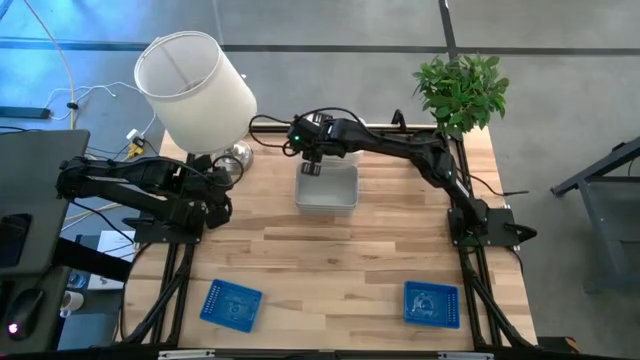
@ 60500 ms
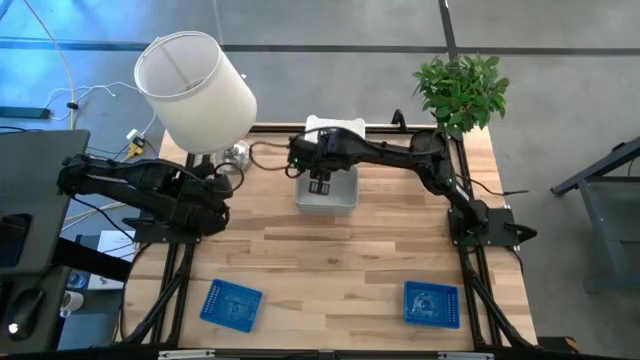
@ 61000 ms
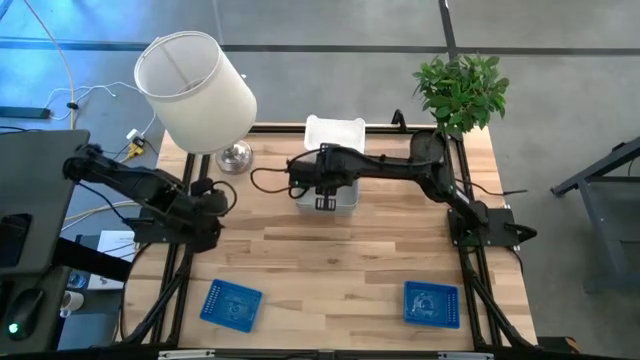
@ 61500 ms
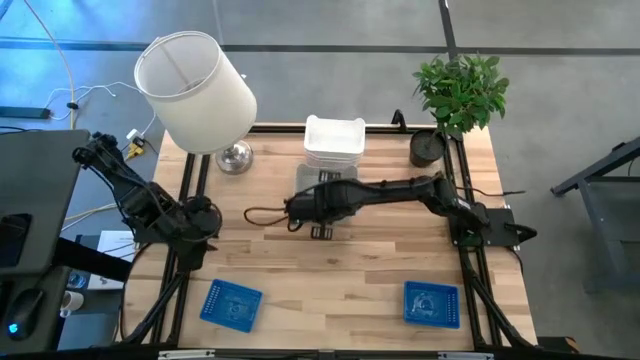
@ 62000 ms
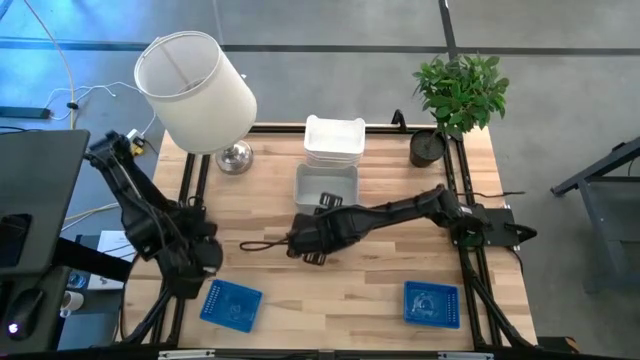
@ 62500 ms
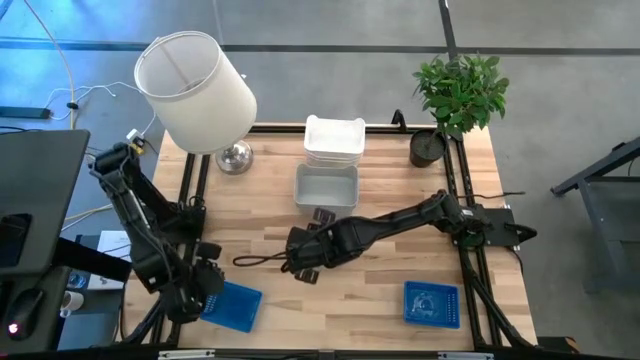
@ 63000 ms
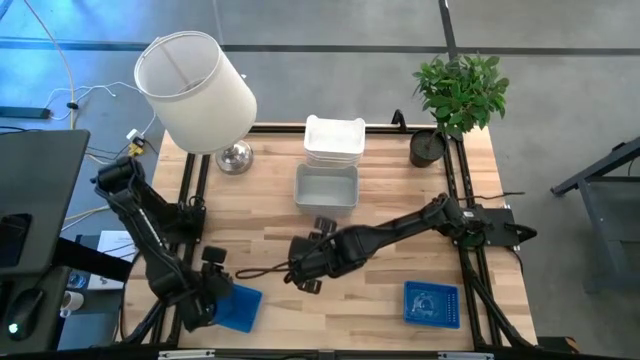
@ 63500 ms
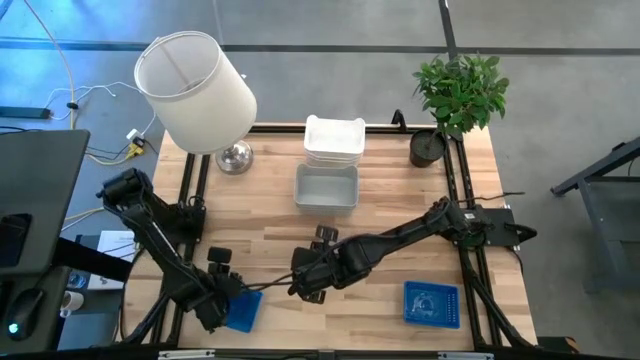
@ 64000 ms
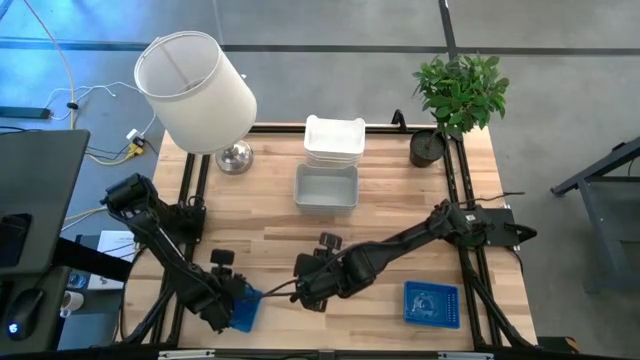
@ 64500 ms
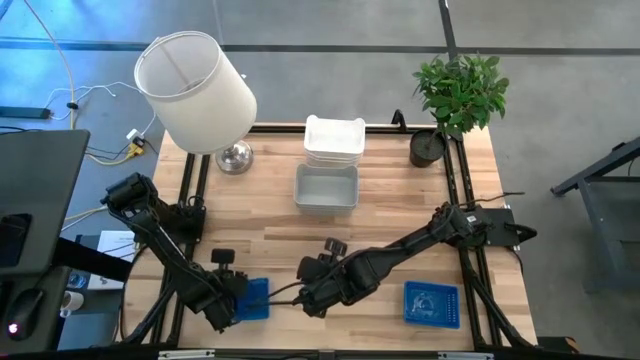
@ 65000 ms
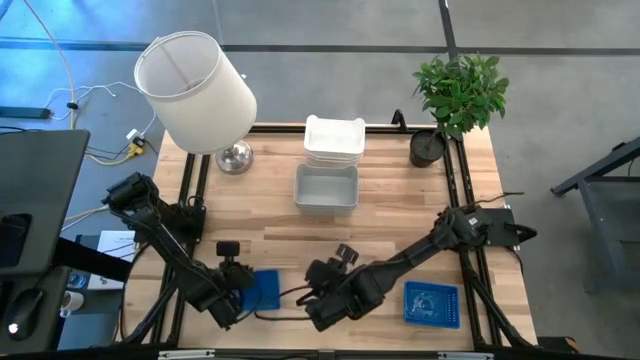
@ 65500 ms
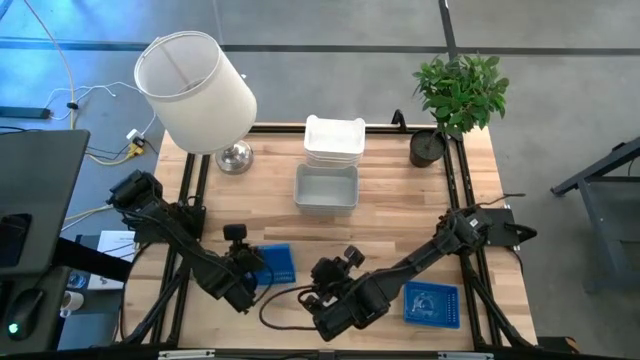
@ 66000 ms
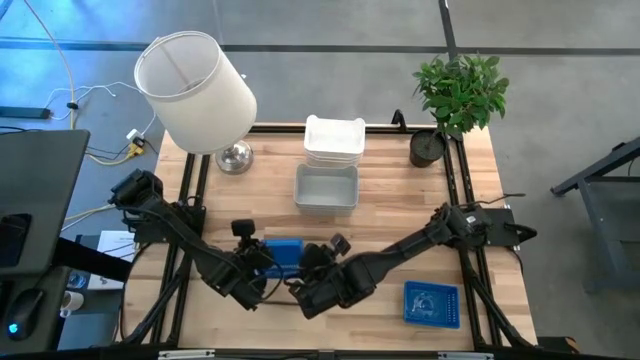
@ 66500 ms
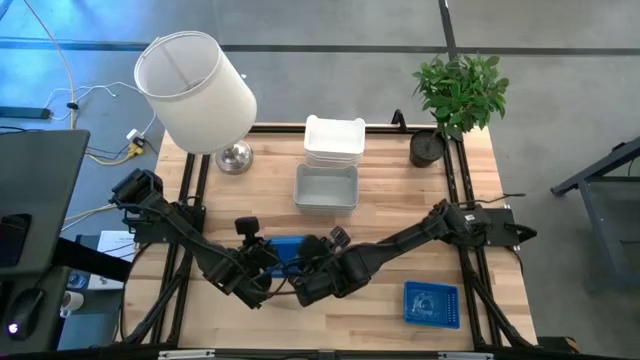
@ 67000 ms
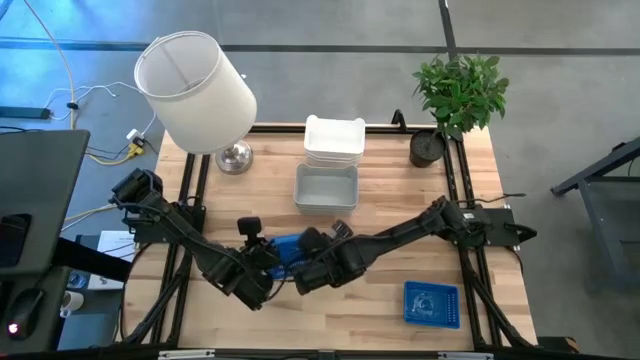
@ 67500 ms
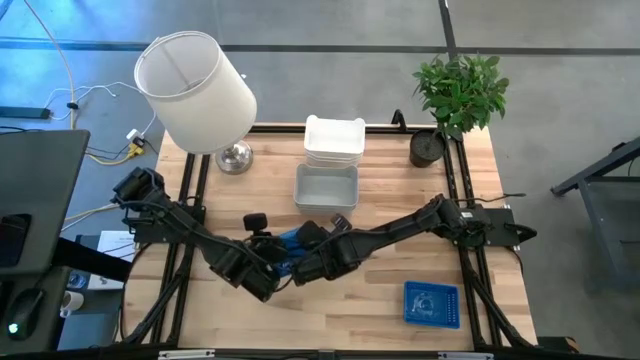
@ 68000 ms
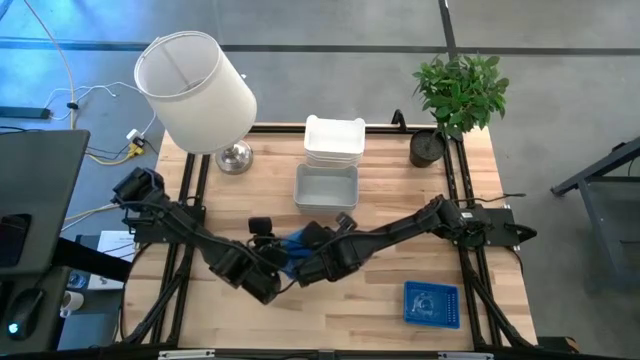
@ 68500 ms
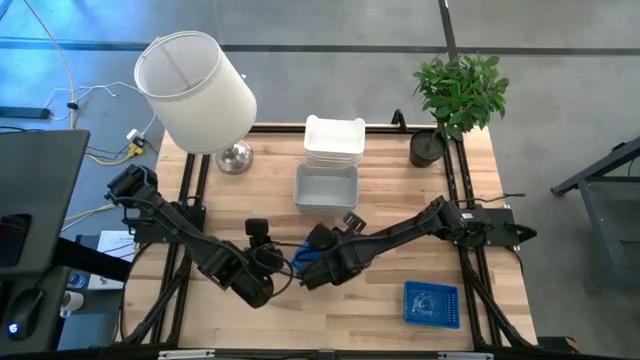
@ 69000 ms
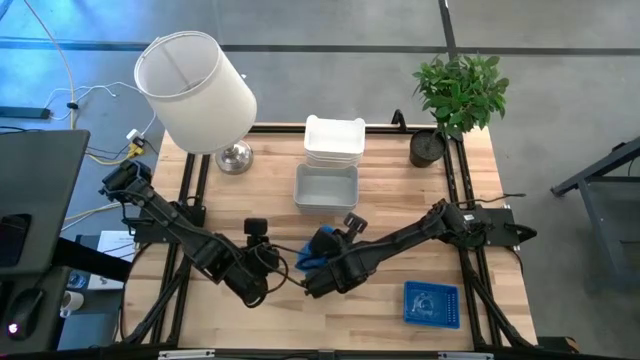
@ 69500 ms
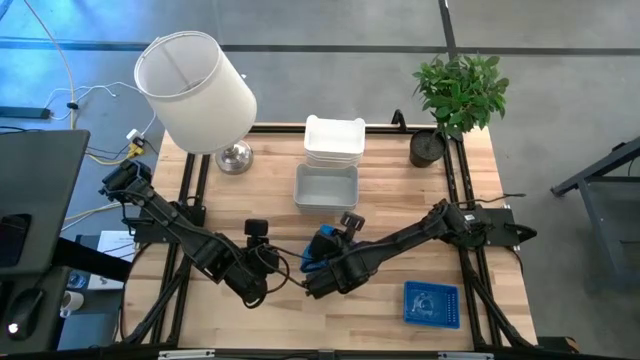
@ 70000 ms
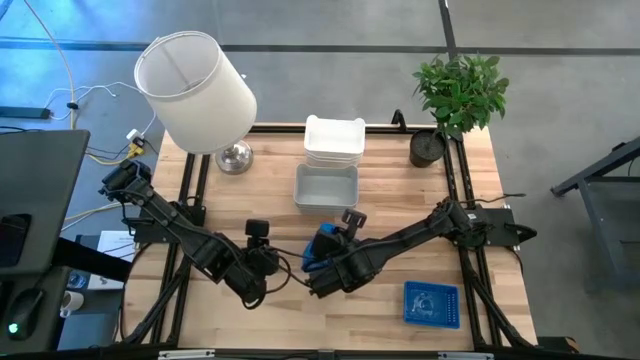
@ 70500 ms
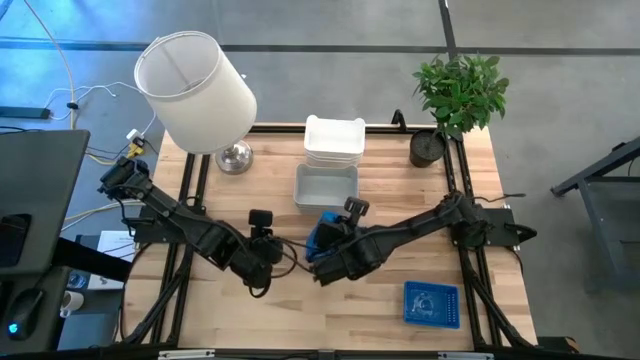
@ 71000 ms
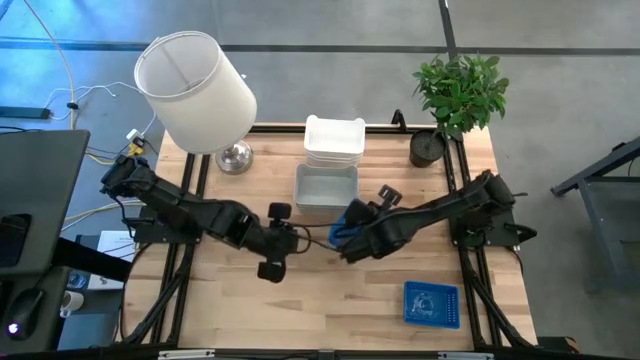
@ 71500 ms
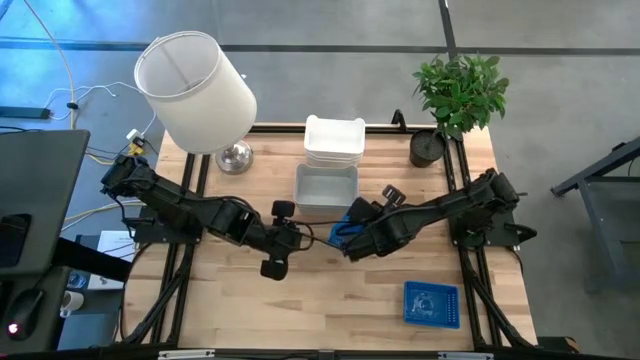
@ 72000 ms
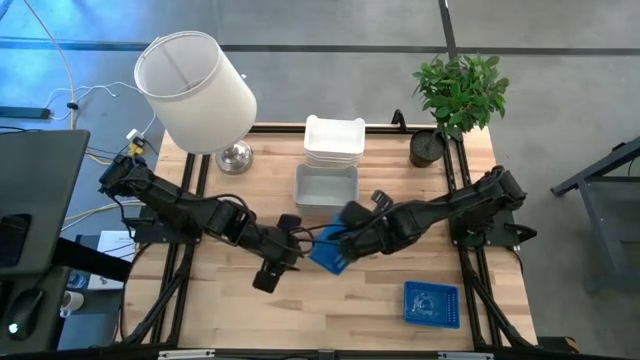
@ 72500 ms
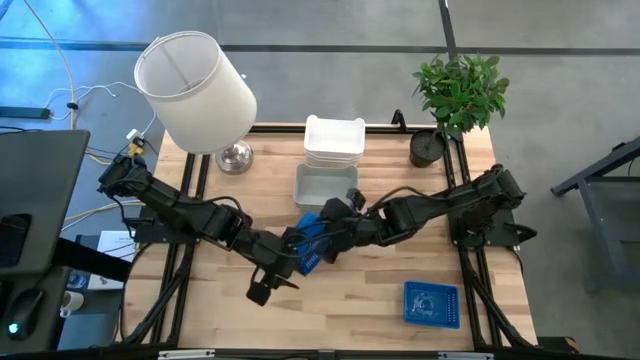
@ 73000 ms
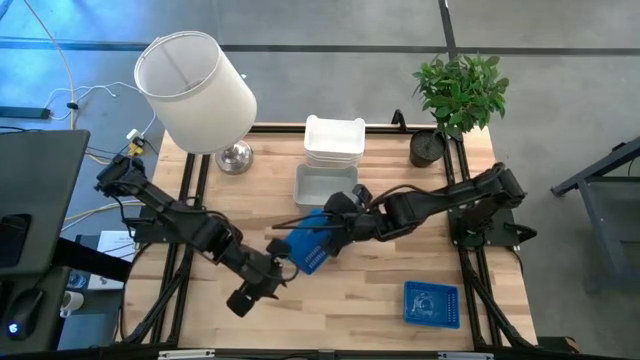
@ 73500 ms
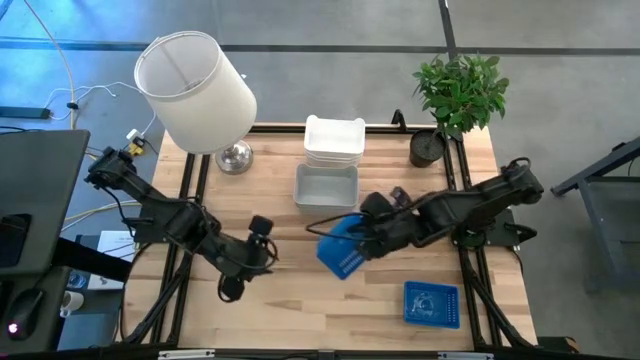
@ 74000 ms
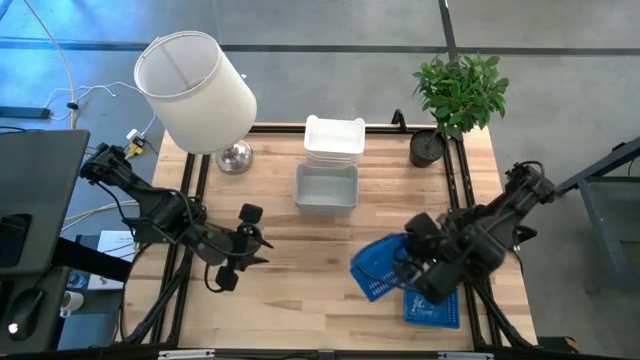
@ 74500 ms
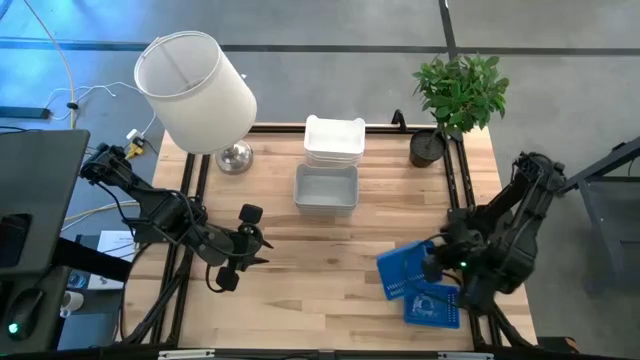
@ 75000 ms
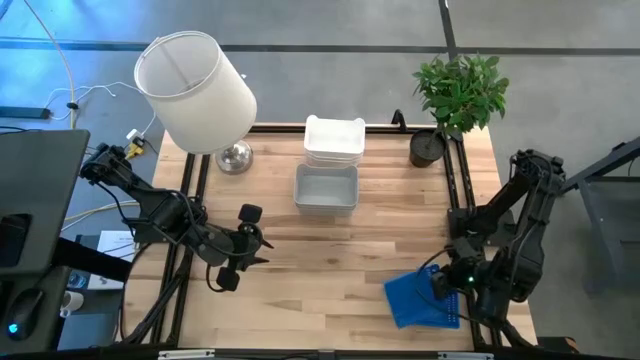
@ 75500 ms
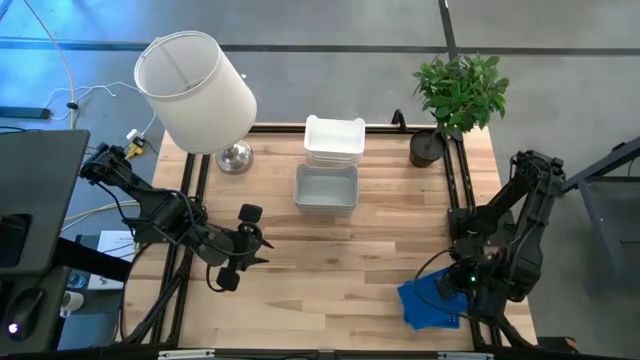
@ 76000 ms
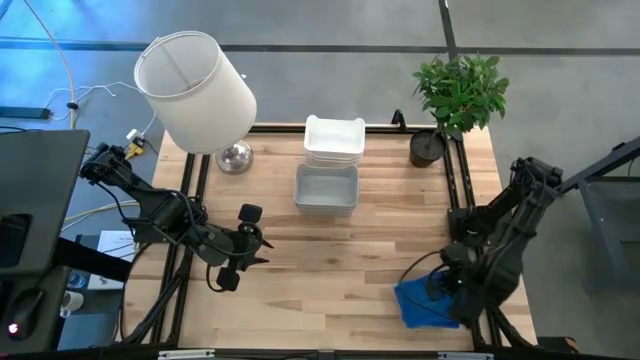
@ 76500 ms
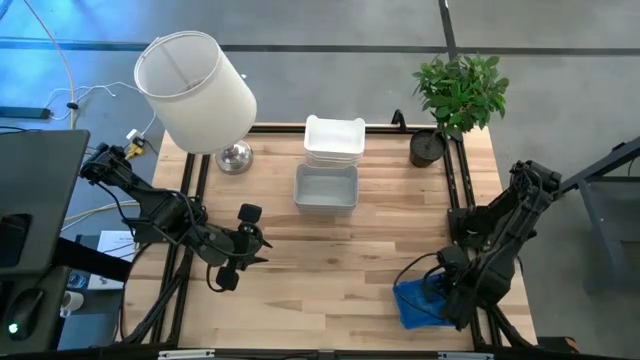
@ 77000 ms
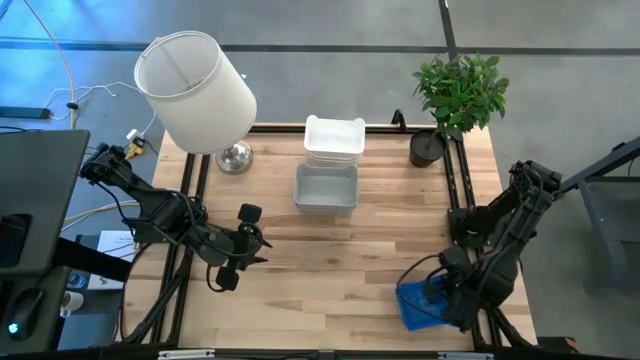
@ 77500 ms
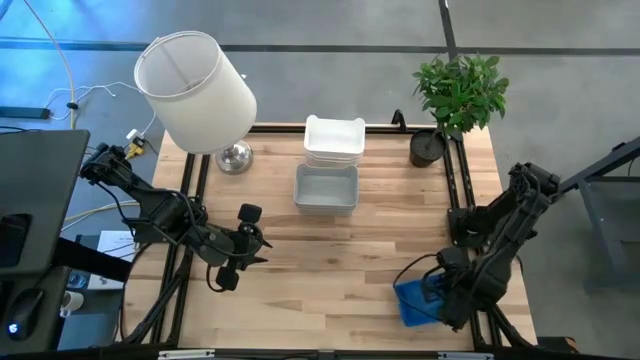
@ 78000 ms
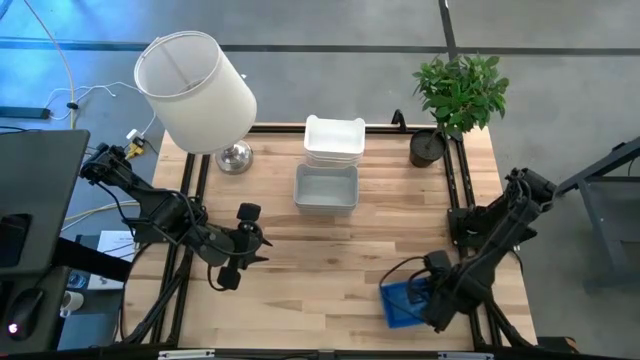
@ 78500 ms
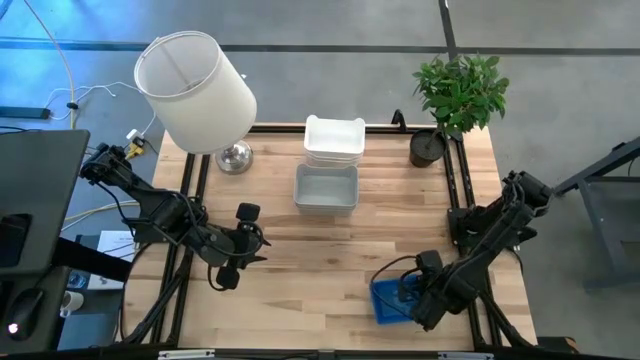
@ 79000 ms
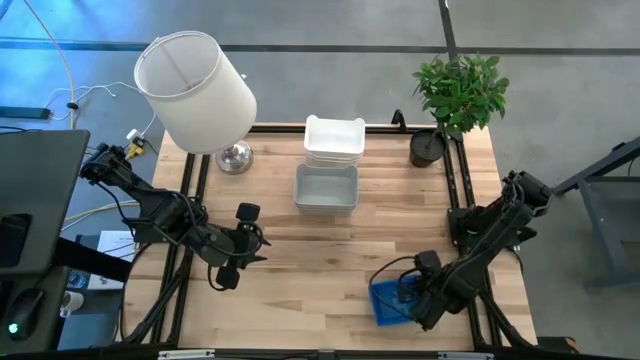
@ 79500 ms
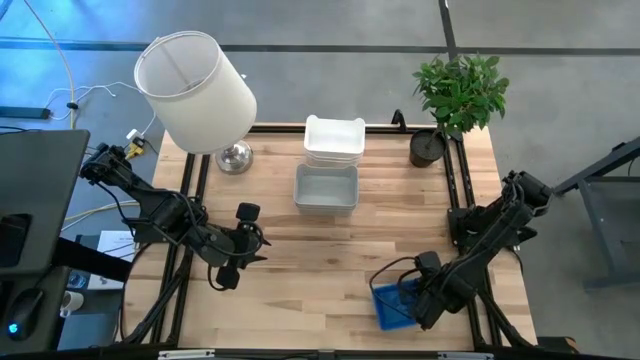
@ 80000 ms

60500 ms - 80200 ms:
Stack the blue bin on top of the right blue bins
